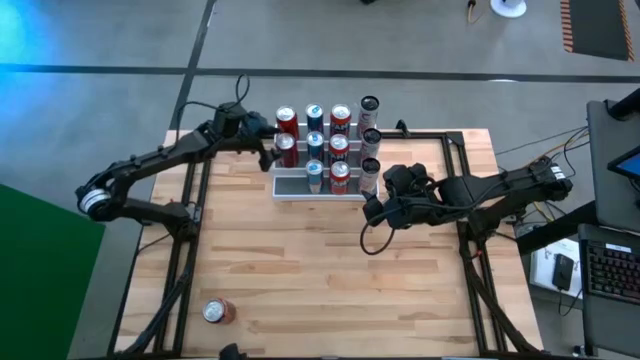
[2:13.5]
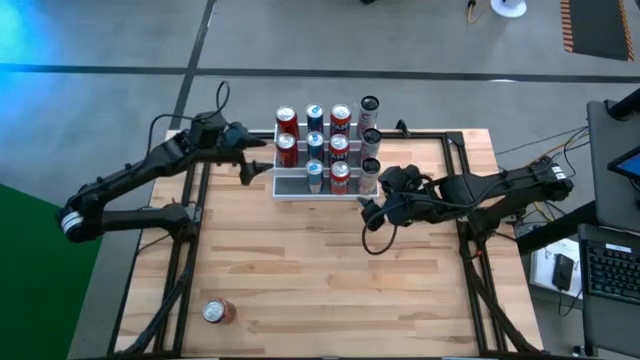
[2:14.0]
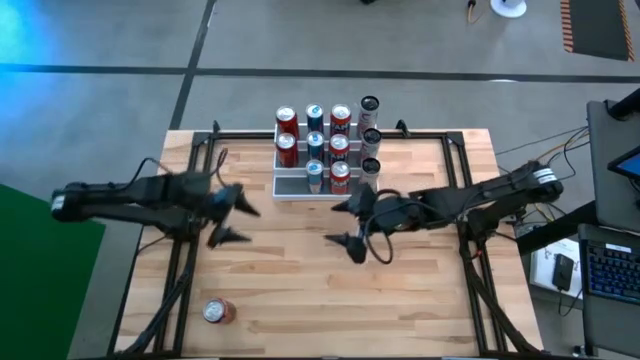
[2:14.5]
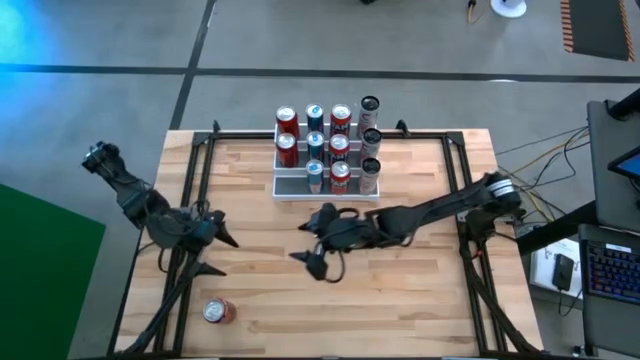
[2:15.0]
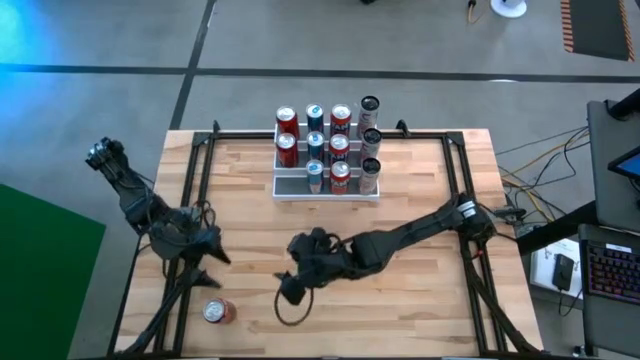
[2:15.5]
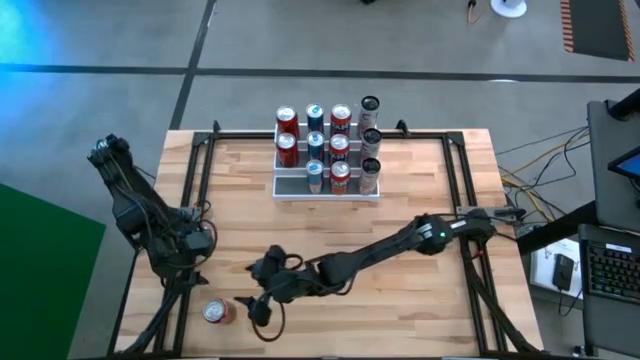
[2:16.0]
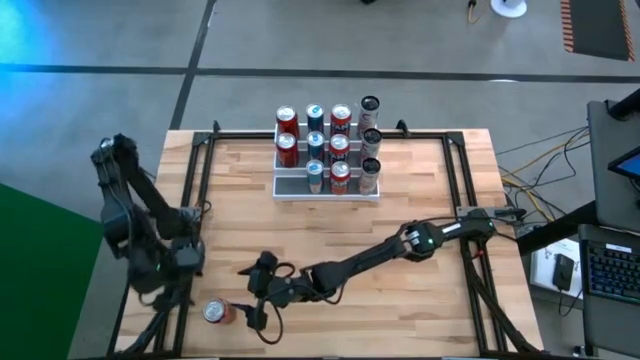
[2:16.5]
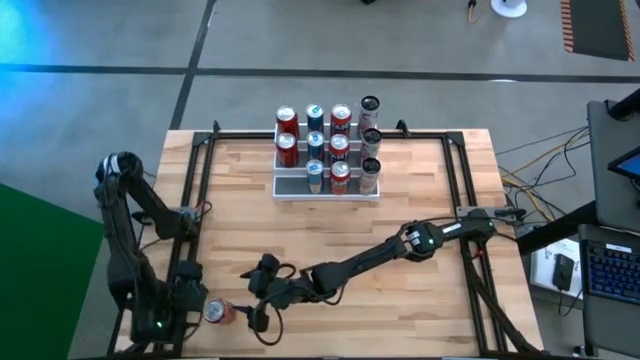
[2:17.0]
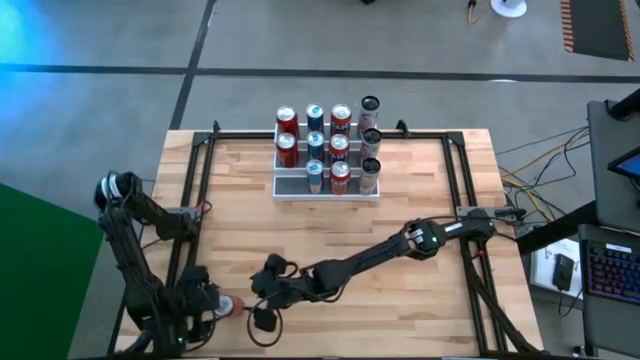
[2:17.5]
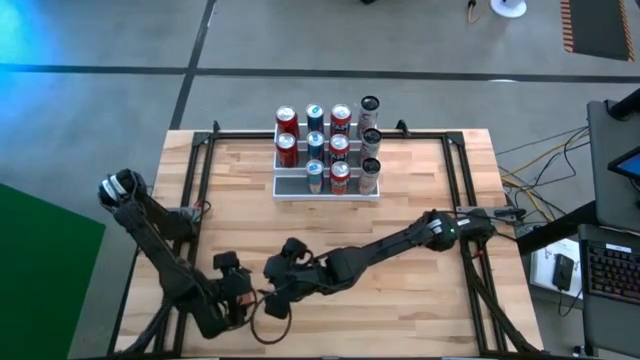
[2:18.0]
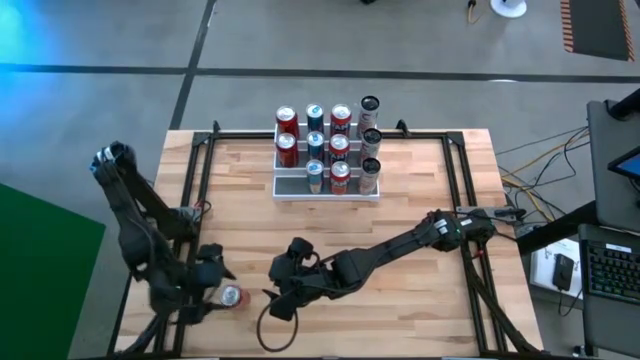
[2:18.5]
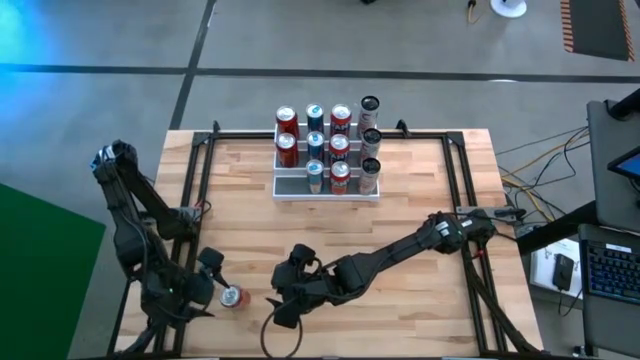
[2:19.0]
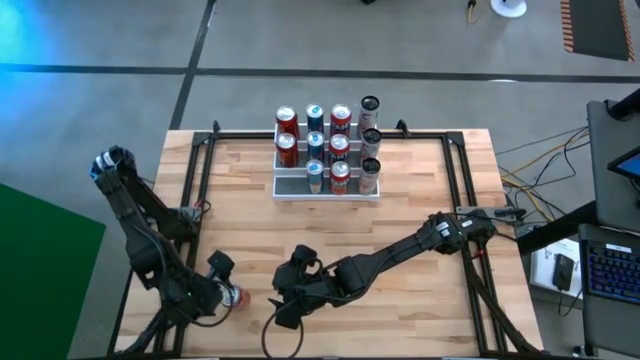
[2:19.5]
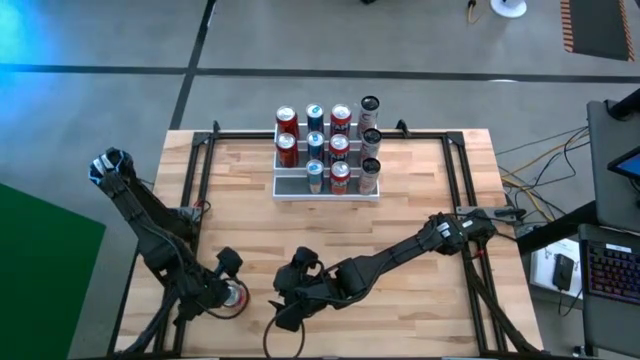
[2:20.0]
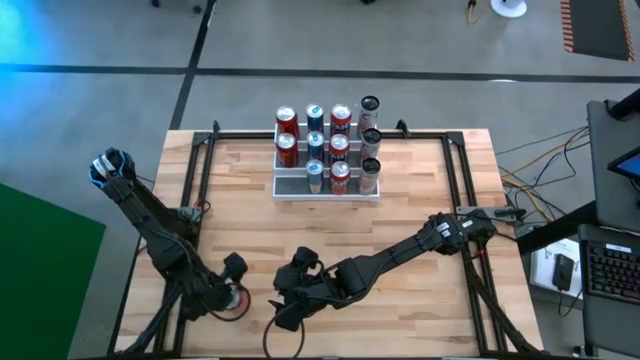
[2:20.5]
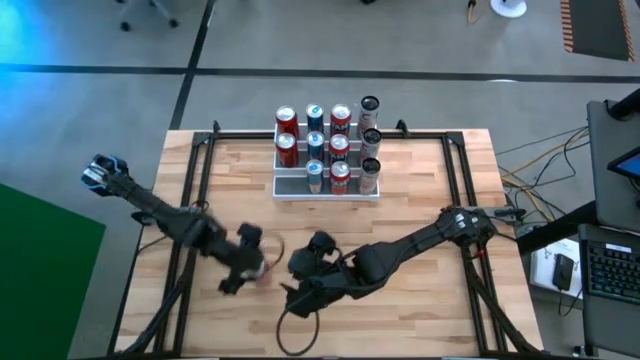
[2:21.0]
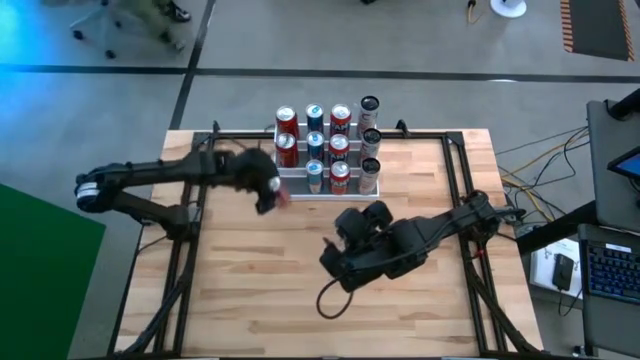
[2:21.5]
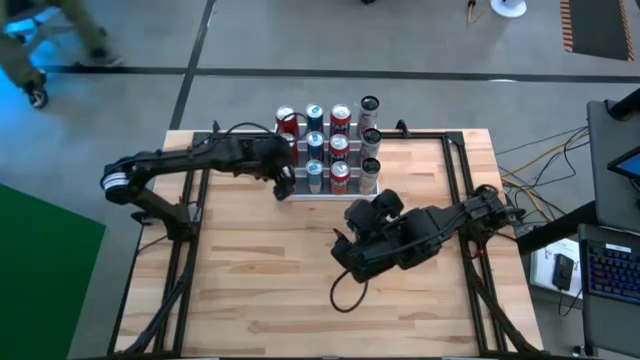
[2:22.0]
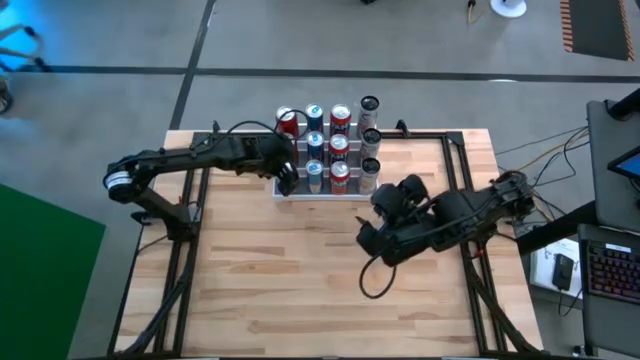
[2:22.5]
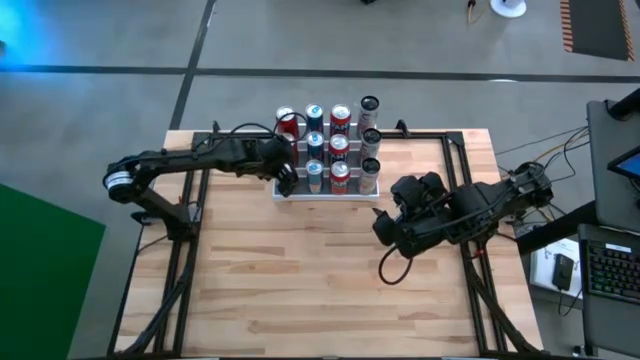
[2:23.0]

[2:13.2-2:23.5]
Task: Place canned beverage on shelf
Put the red soda can on the bottom tier of the shelf aligned with the other red soda can

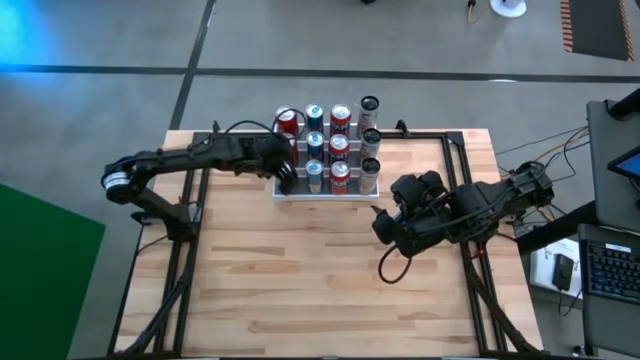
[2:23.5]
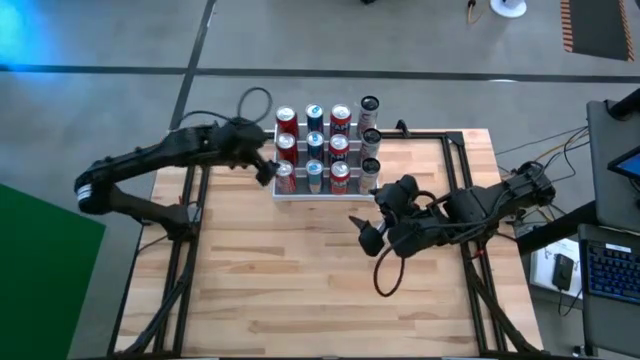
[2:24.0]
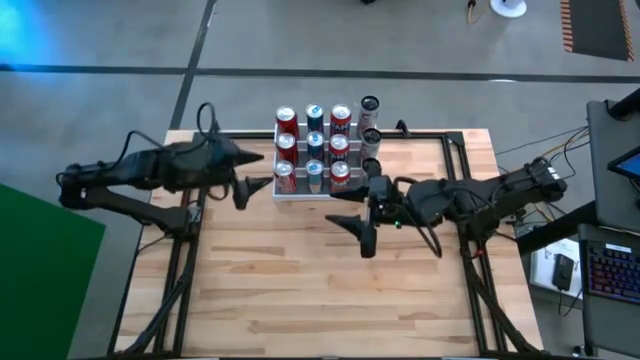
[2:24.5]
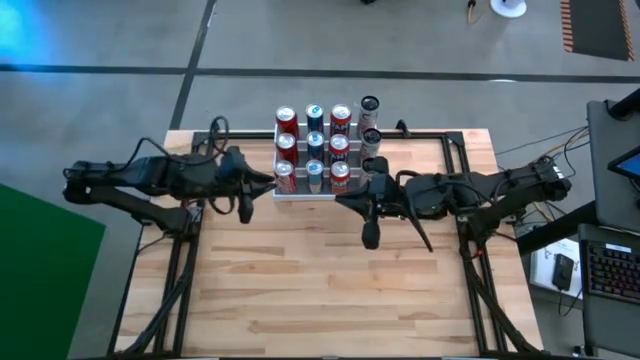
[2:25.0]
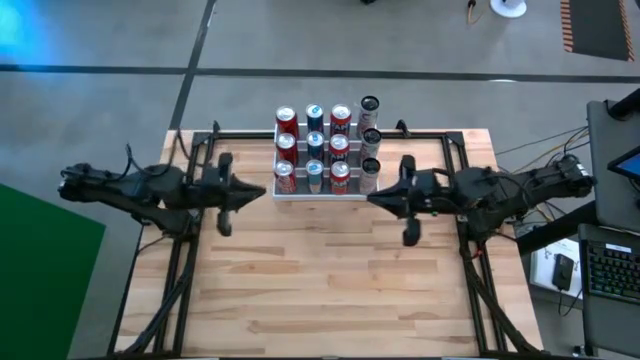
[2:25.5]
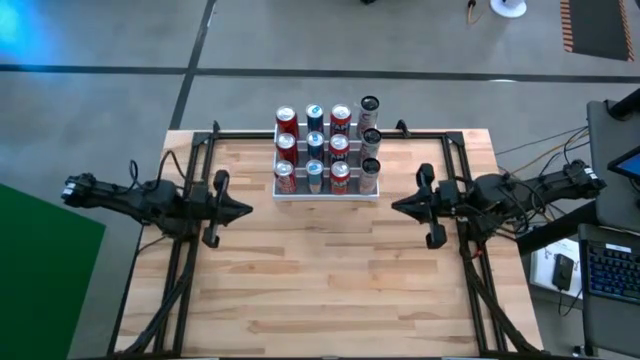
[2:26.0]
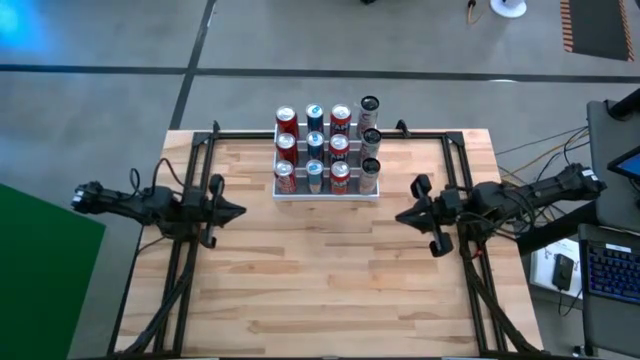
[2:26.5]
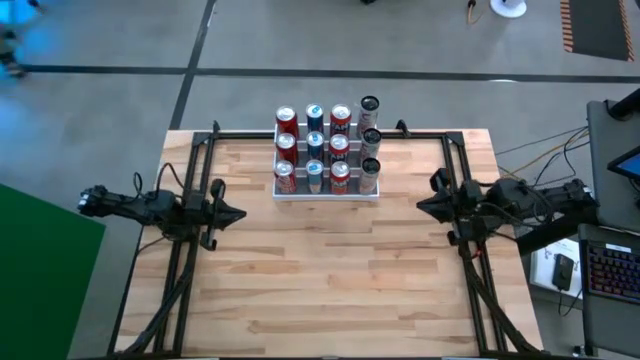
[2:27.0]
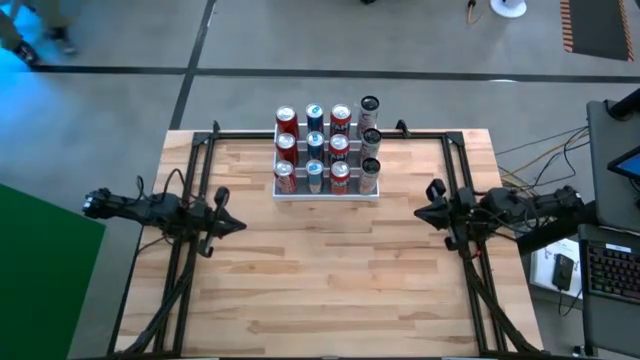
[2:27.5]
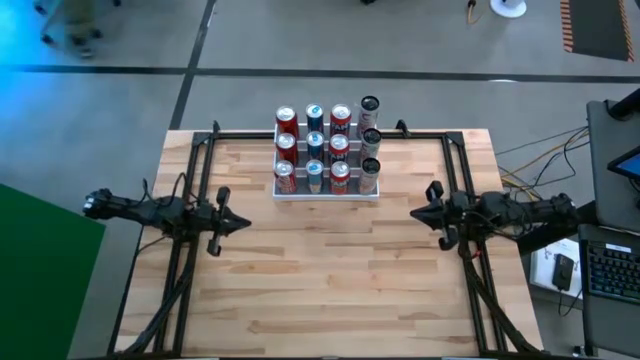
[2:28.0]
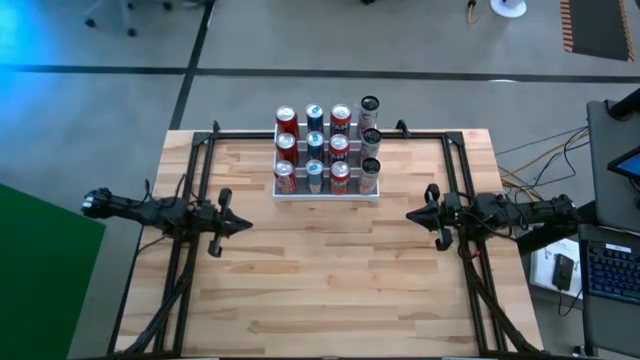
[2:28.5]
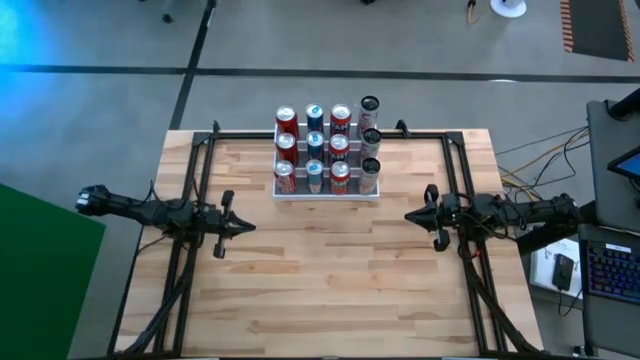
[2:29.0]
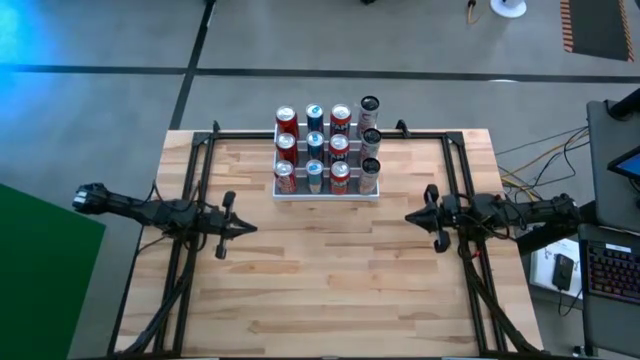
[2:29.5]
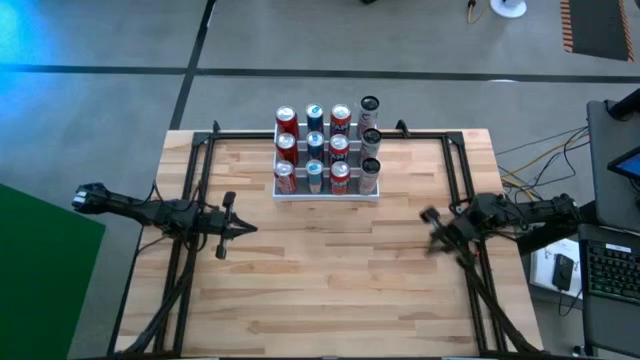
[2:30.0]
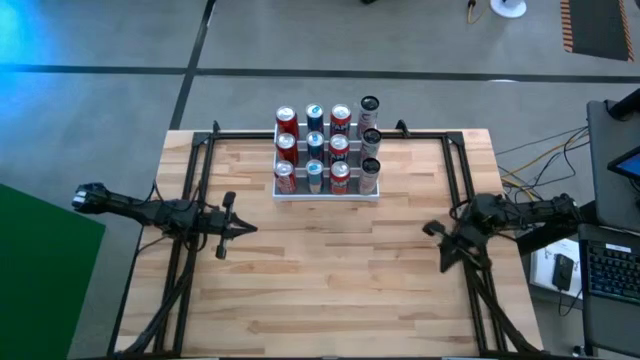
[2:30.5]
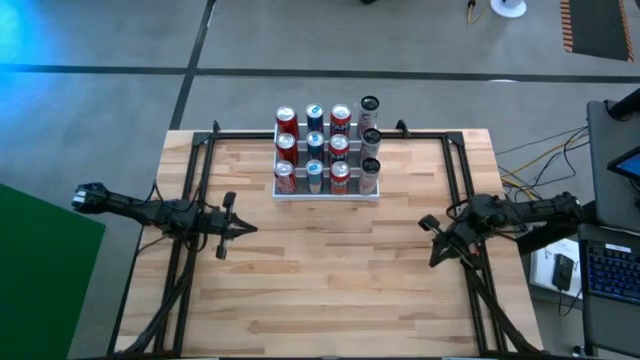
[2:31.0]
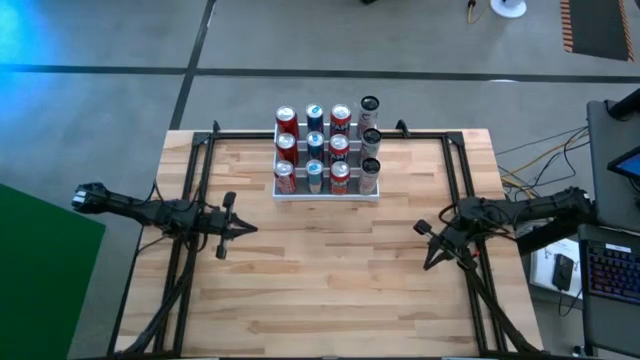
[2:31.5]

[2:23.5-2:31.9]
Return to Home Position

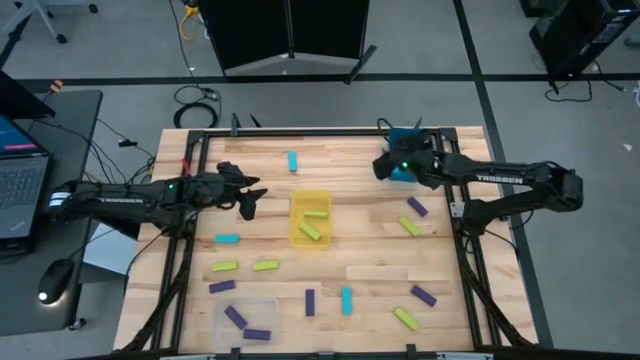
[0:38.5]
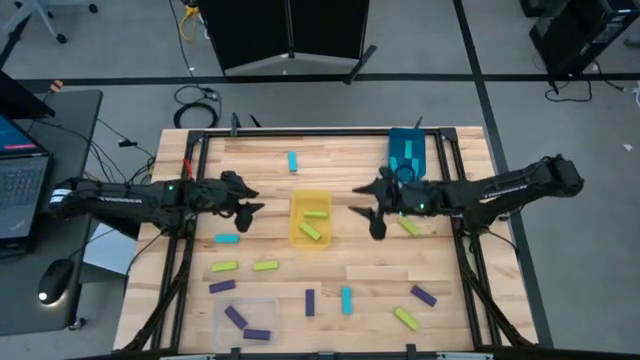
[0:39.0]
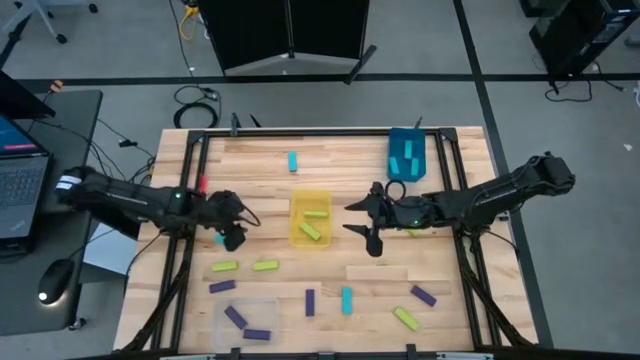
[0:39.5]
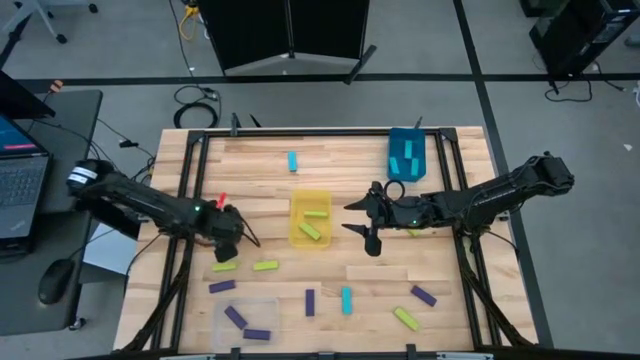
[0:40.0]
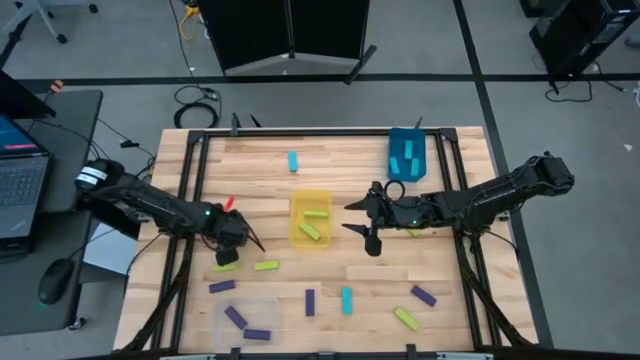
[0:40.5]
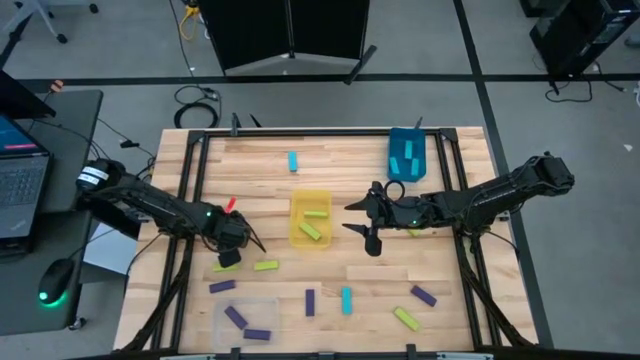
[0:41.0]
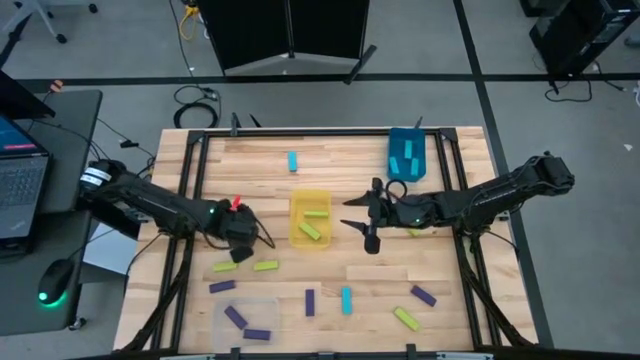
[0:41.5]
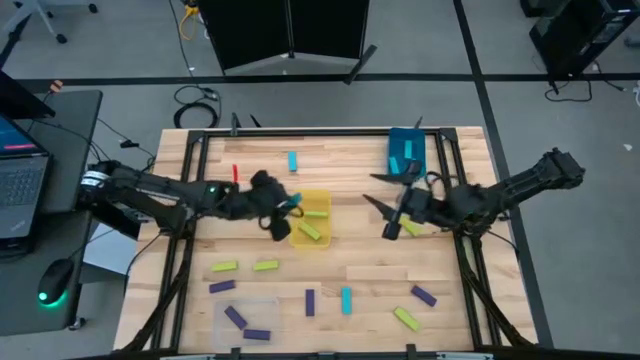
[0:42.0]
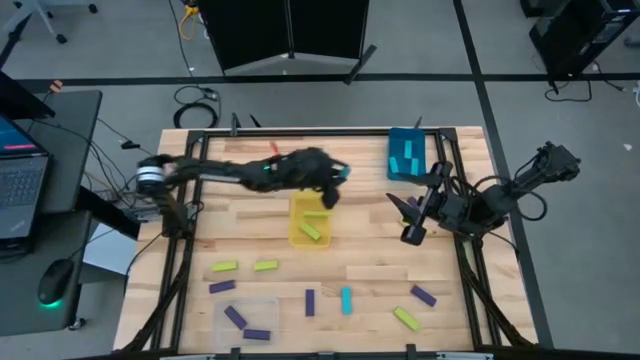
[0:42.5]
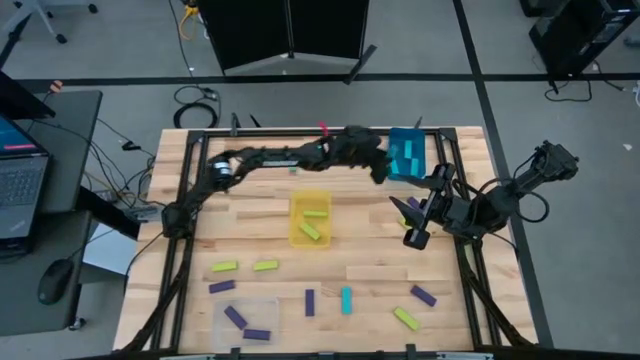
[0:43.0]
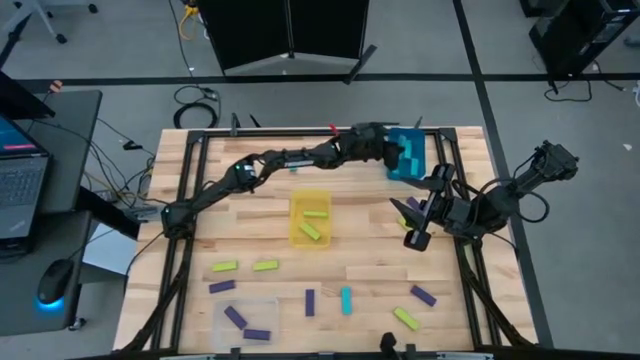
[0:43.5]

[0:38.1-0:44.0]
Task: Sort blocks
Put the light blue block into the blue bin
